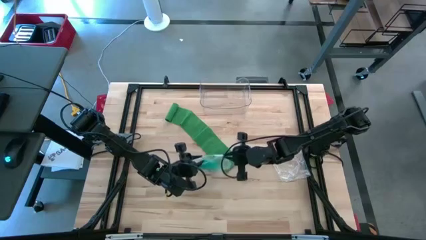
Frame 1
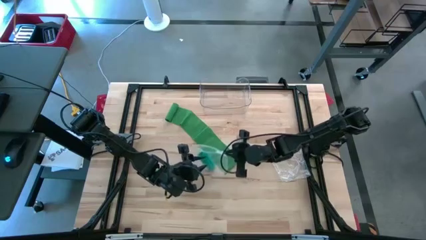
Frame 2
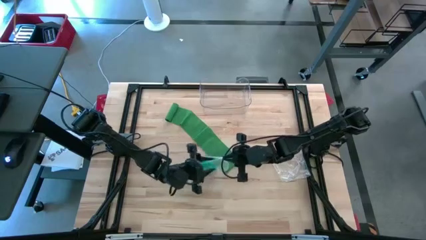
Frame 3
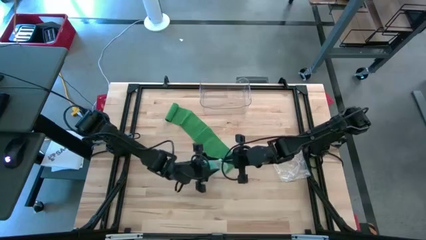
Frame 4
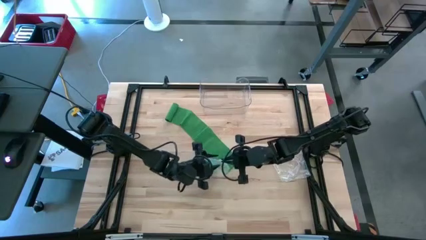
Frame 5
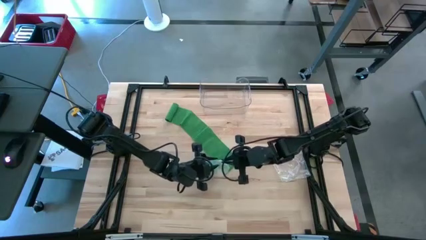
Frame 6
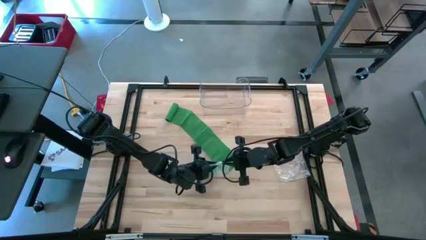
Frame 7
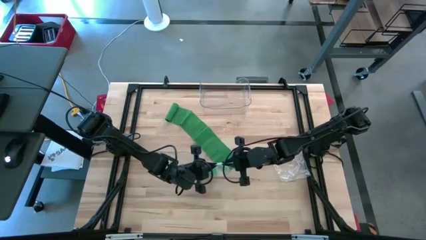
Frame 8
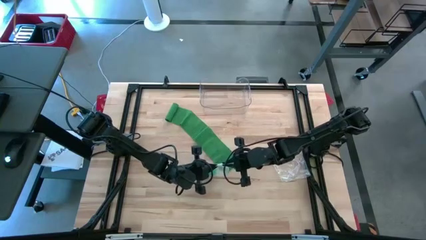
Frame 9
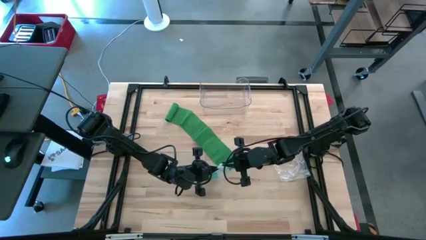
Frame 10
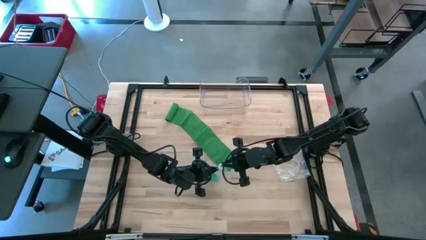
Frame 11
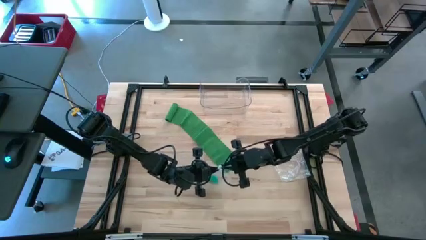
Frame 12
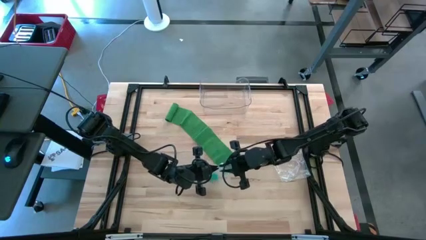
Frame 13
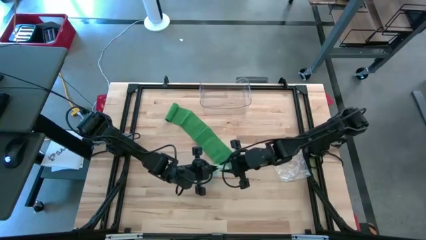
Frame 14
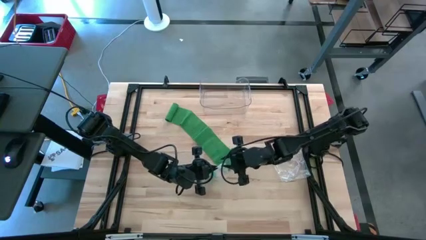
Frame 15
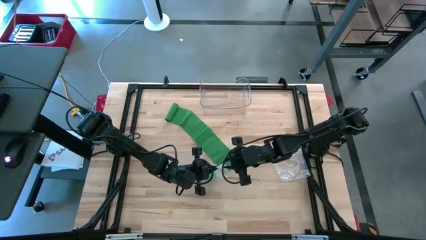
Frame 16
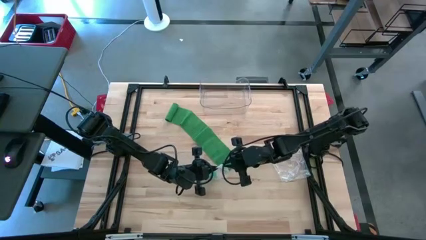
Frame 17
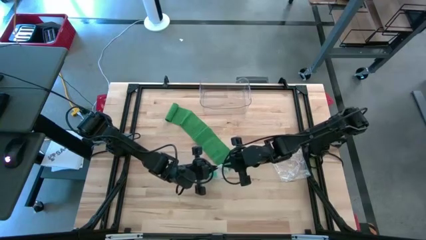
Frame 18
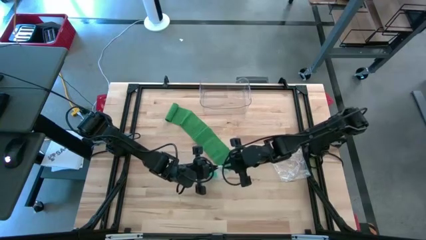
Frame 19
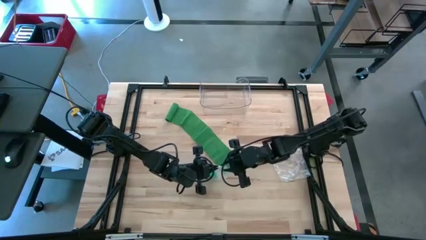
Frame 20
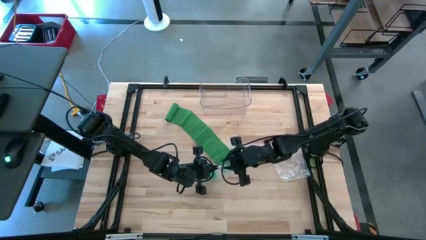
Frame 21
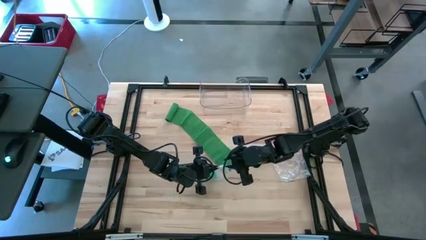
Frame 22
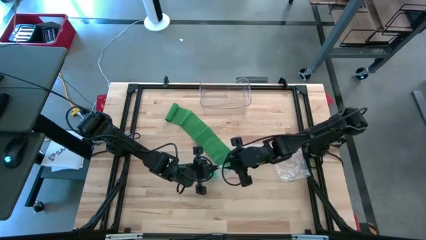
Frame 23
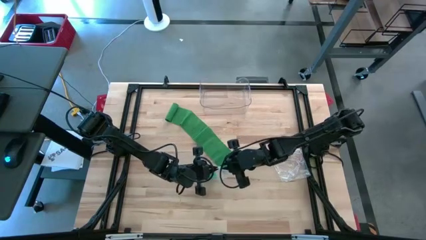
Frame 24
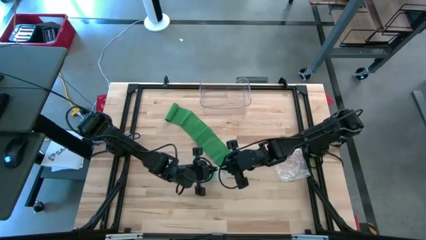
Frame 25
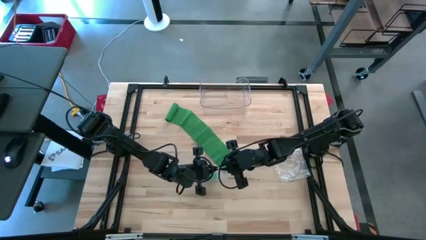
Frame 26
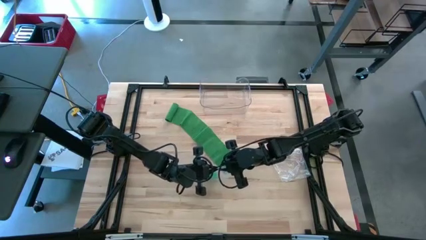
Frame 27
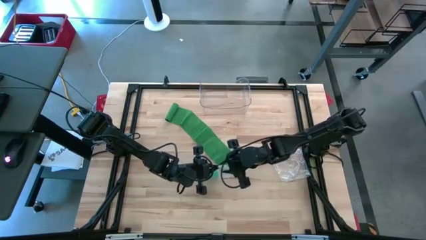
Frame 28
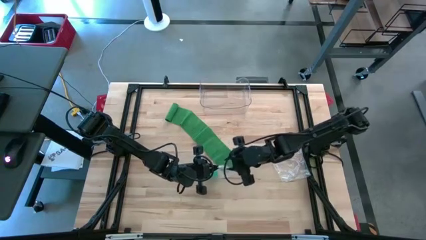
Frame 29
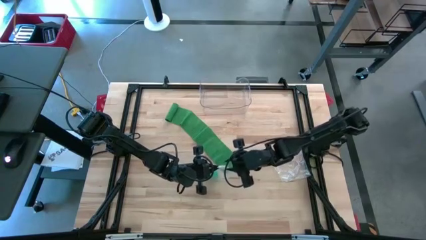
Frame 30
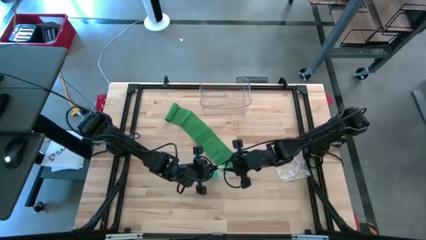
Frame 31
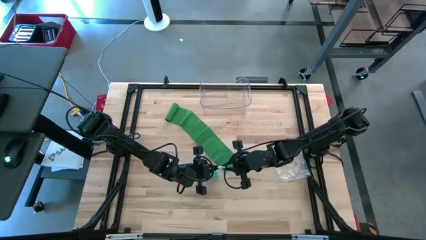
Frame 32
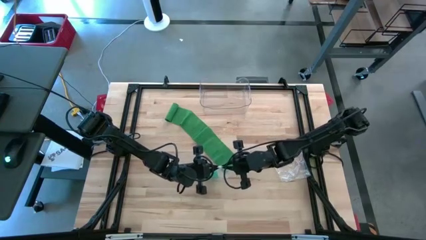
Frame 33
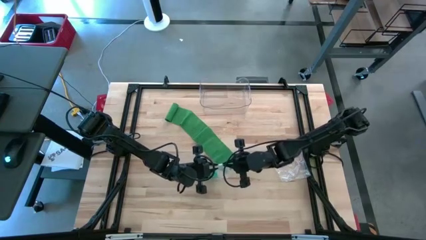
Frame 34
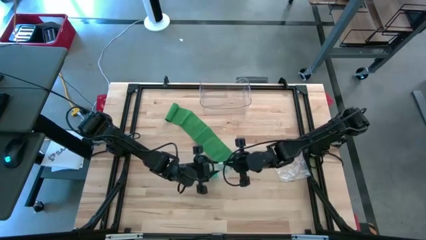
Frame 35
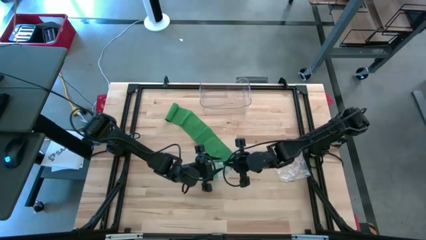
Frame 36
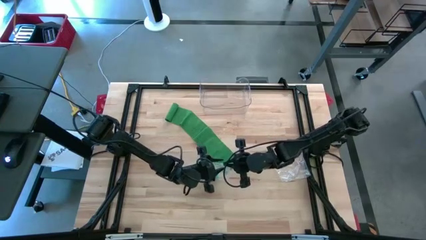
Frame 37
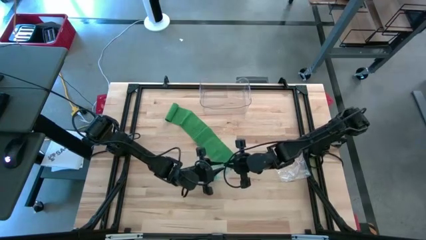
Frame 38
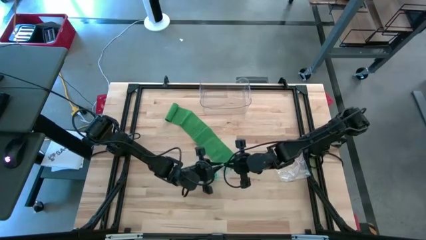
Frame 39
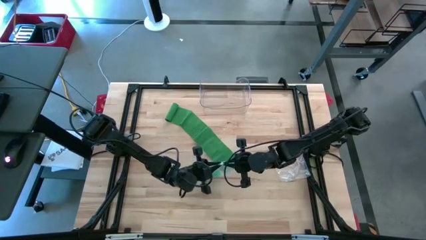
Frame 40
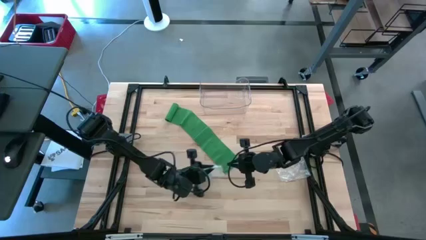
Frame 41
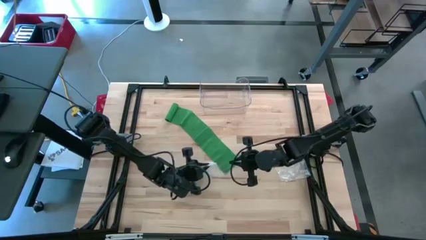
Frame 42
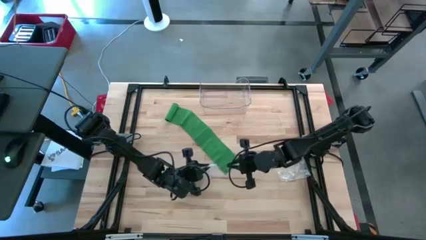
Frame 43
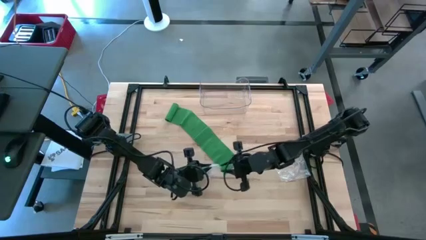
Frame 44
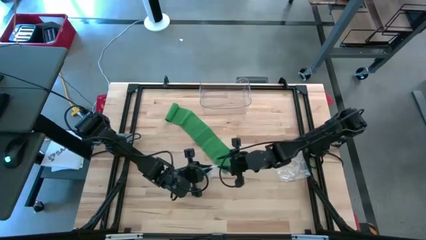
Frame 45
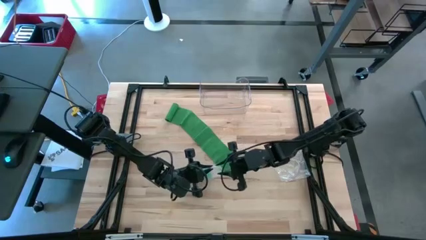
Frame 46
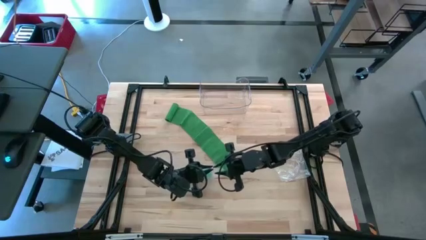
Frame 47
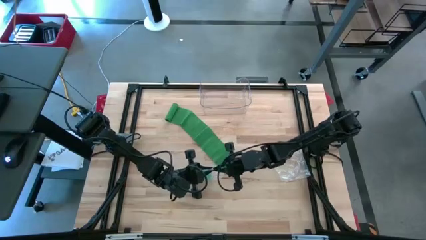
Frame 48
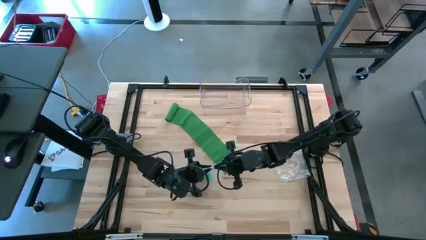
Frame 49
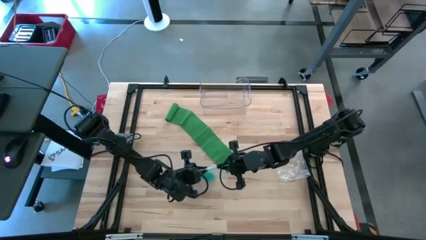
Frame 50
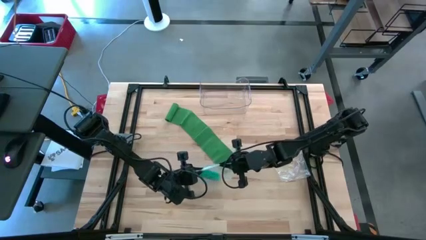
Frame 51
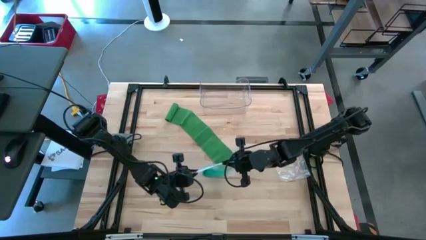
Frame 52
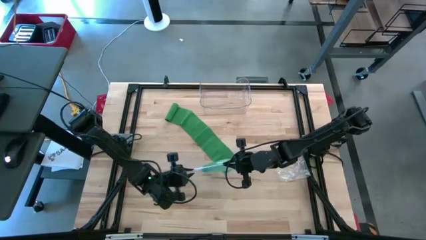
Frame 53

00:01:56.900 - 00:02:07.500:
Task: Roll bandage
Close the left zip bag

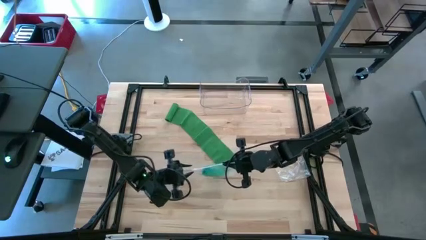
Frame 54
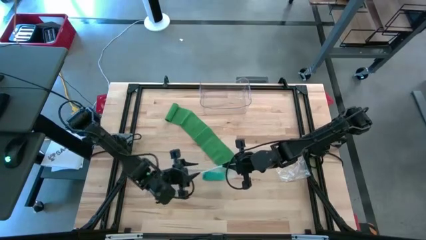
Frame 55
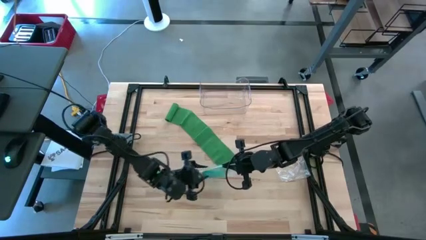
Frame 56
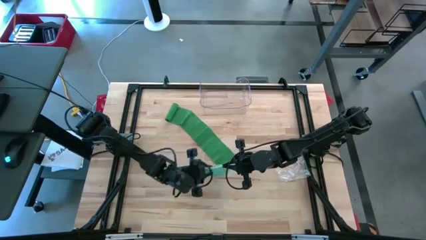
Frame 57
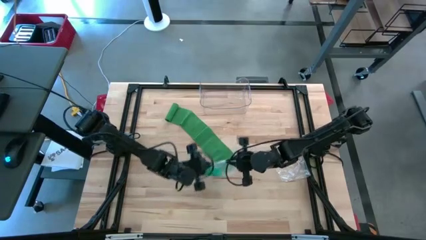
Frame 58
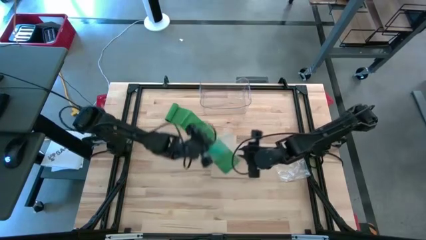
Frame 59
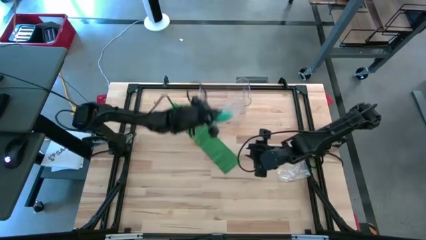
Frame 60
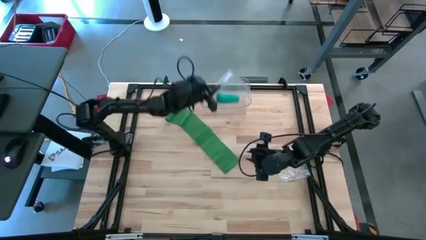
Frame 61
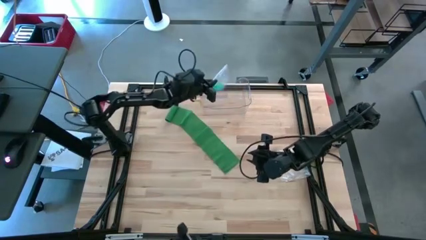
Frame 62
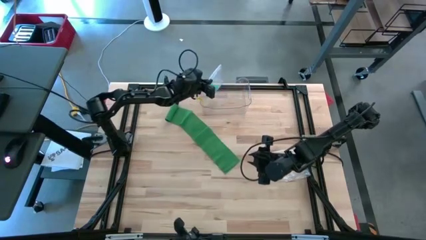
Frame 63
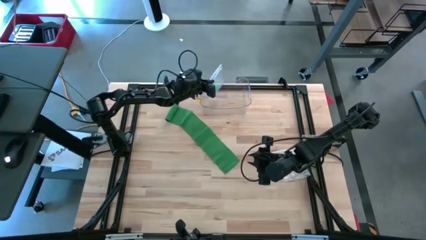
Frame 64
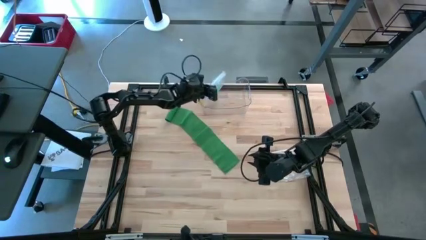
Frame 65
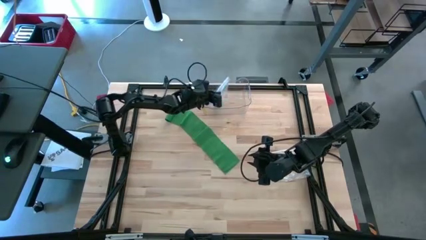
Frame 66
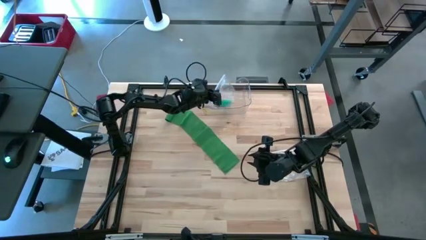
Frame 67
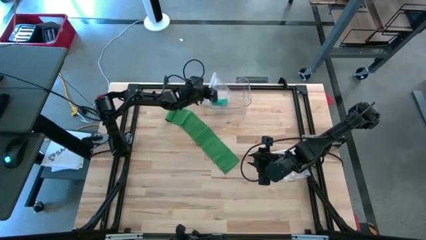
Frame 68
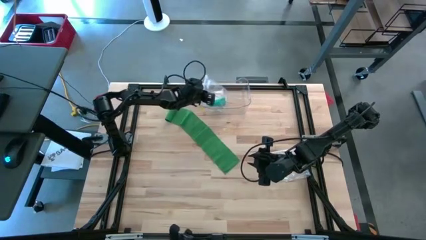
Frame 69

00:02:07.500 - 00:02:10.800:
Put the packed rolled blue bandage into the transparent bin

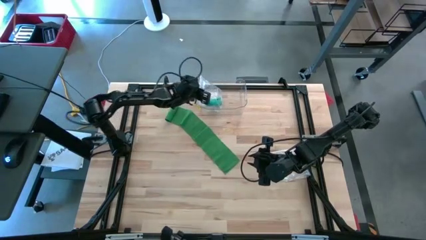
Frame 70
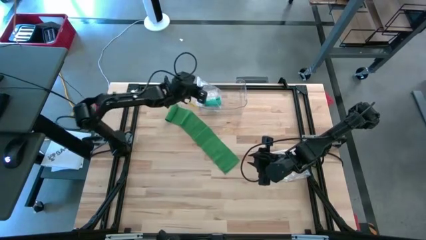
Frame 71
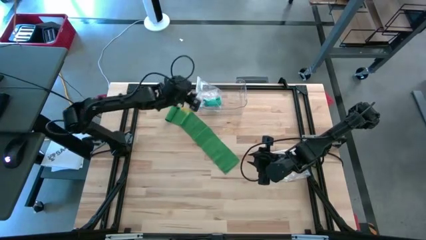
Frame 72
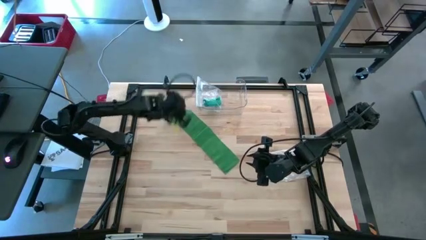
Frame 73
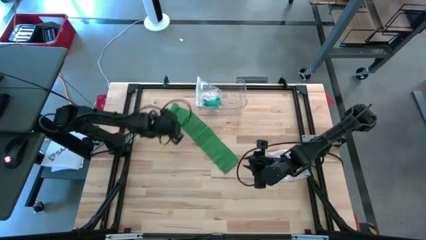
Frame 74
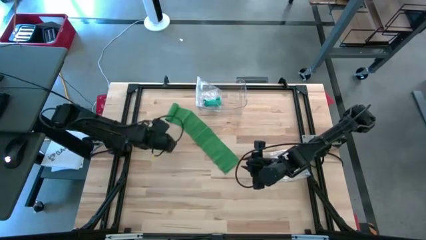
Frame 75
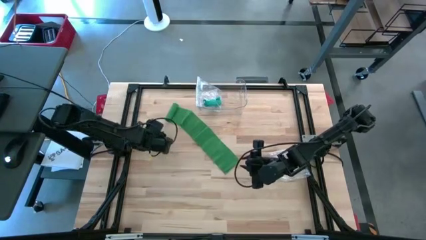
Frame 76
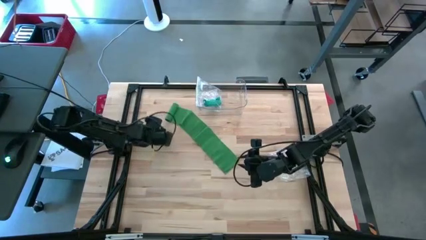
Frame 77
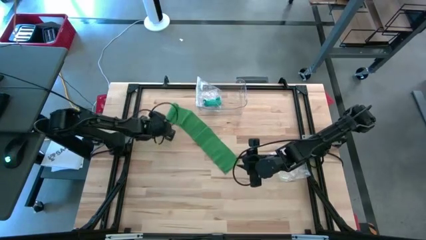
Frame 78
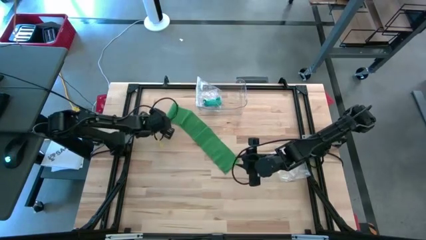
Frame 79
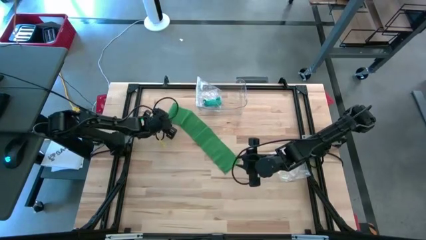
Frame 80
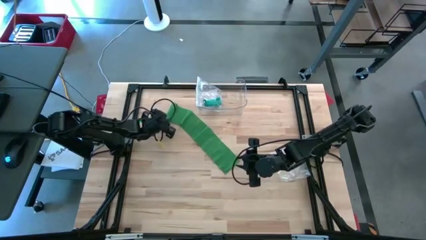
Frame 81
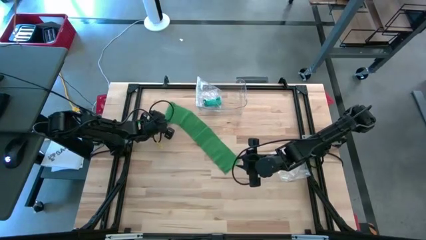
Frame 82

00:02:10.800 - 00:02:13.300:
Roll the green bandage
